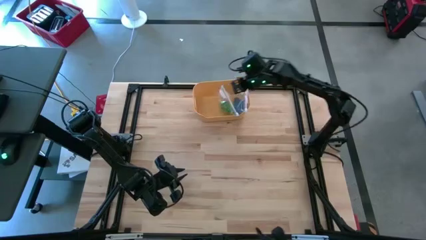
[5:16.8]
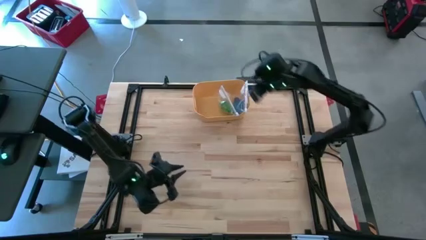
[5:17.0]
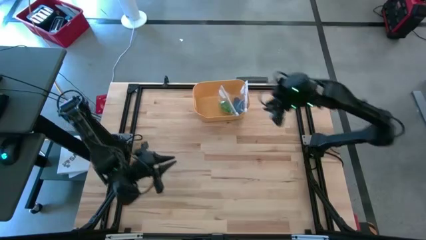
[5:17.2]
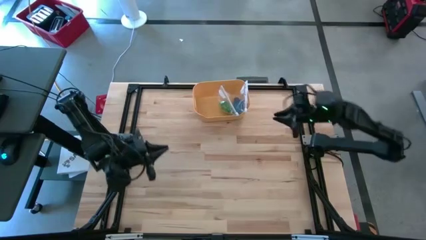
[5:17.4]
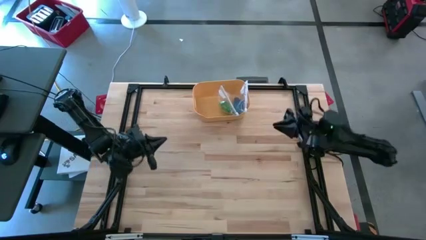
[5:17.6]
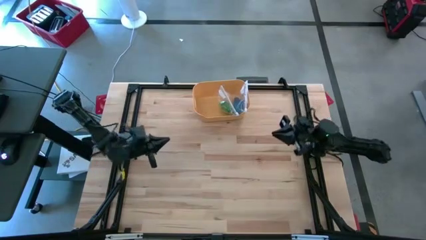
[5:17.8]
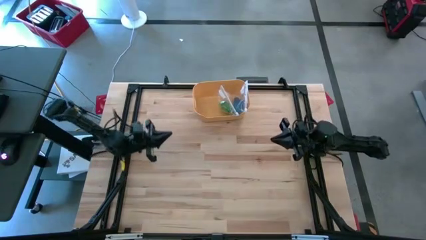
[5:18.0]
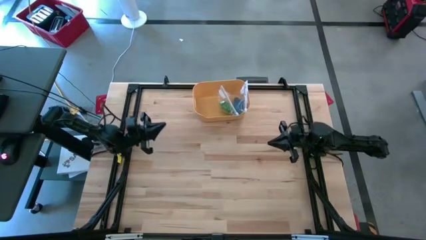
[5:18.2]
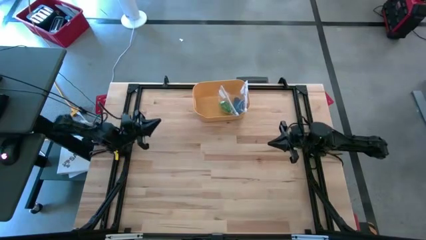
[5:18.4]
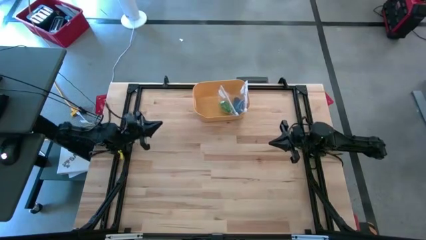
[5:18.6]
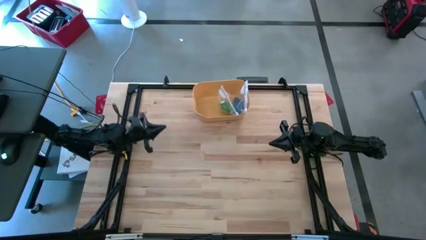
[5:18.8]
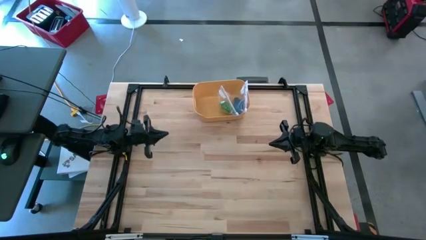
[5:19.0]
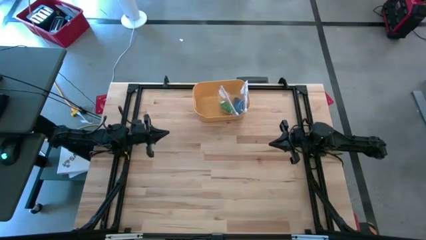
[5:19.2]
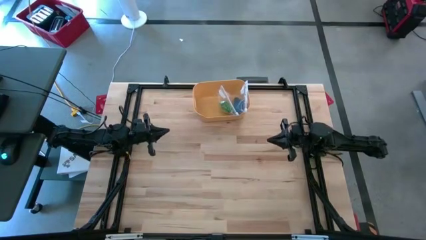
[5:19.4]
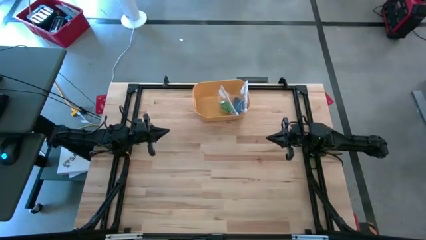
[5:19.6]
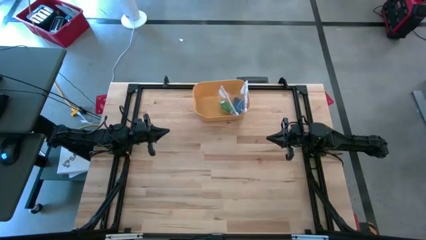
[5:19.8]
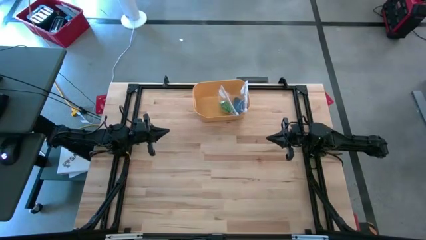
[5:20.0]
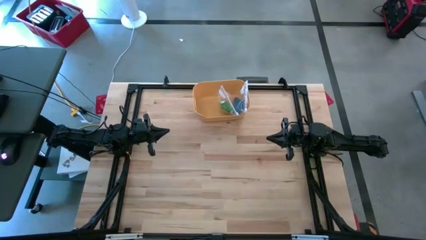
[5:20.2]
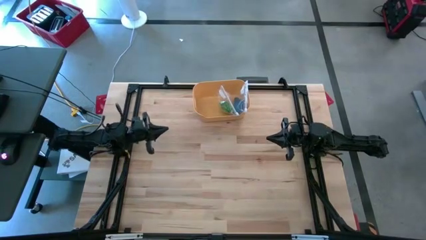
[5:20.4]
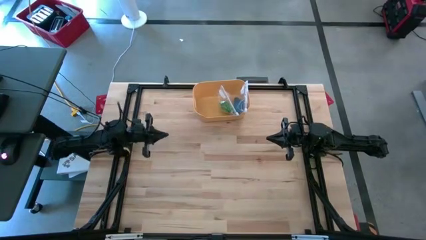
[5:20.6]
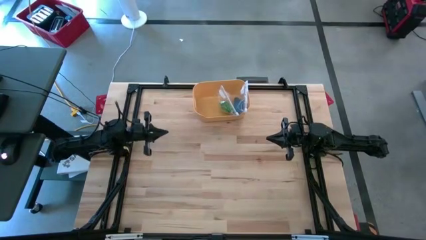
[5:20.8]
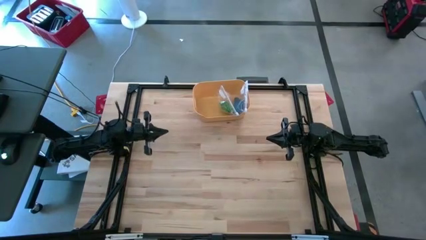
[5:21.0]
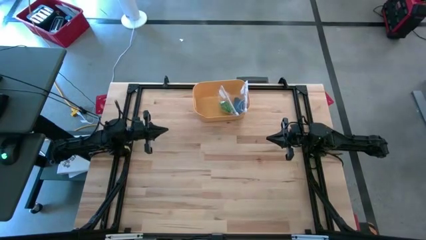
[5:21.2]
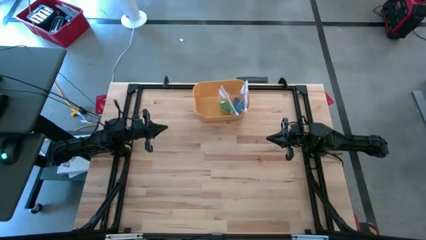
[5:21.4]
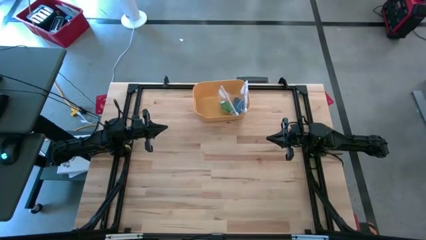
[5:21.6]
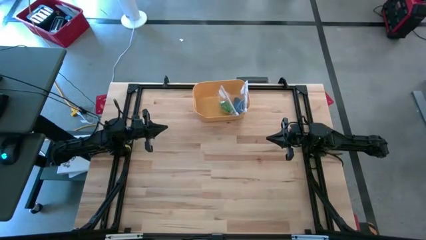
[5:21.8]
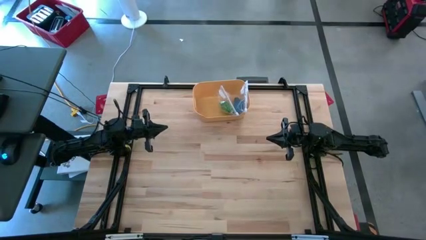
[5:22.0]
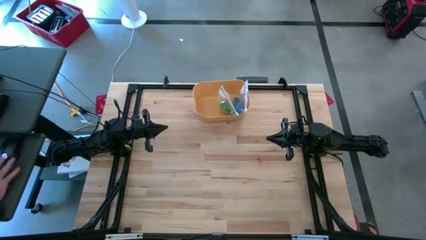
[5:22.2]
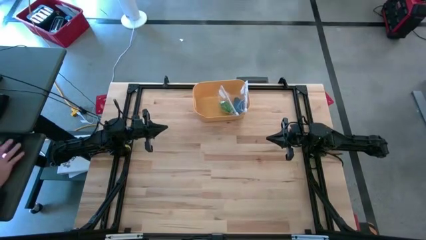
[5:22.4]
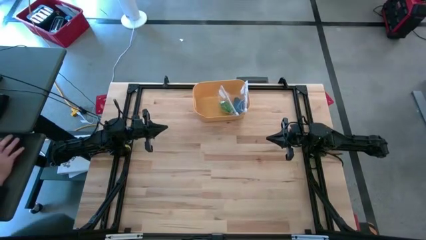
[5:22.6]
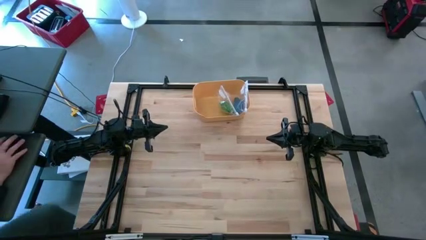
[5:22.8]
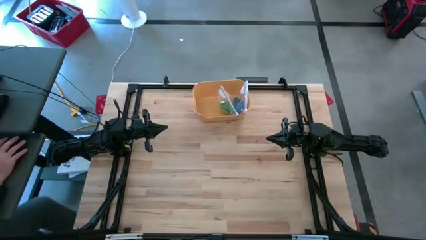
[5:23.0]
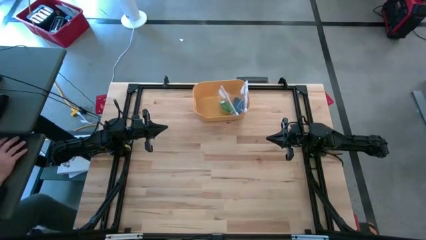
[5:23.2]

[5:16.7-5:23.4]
Task: Roll bandage
Return to Home Position

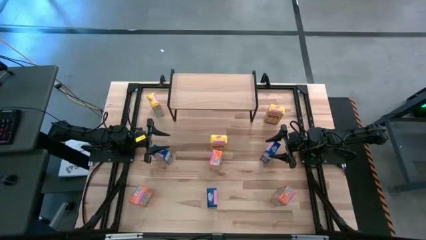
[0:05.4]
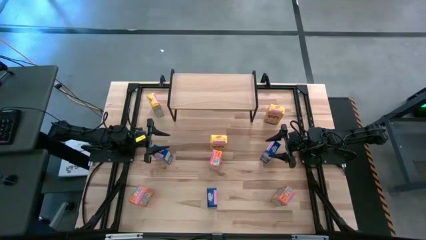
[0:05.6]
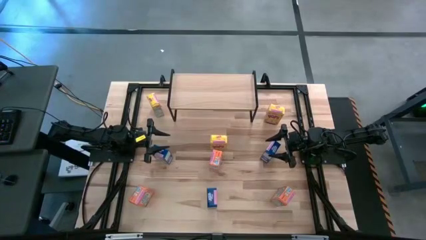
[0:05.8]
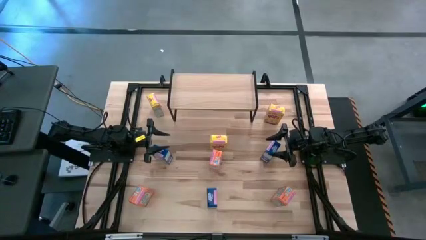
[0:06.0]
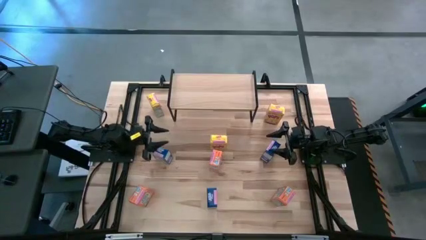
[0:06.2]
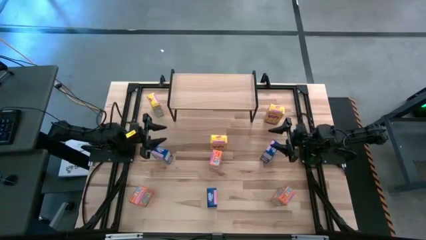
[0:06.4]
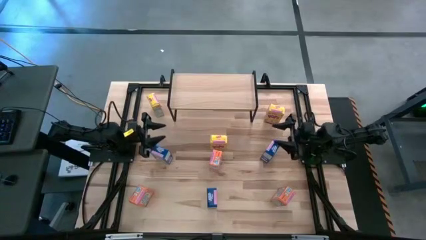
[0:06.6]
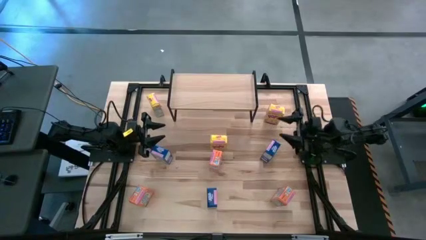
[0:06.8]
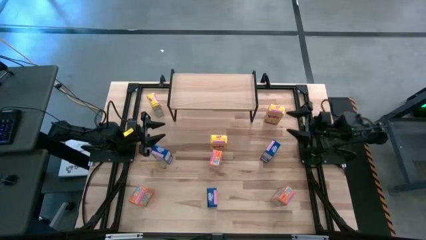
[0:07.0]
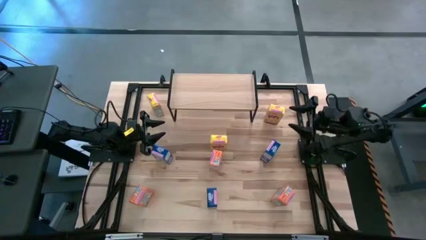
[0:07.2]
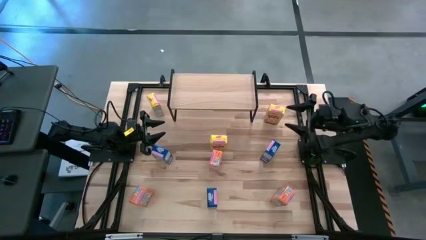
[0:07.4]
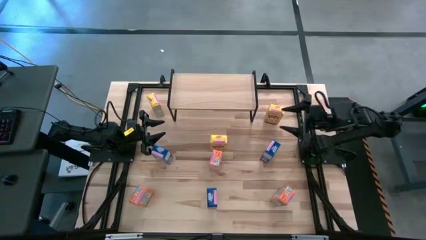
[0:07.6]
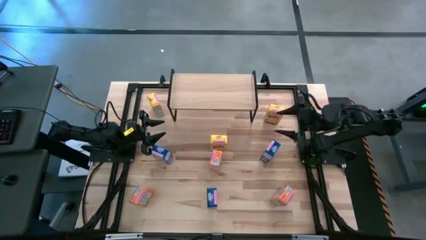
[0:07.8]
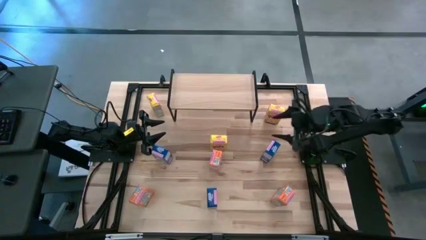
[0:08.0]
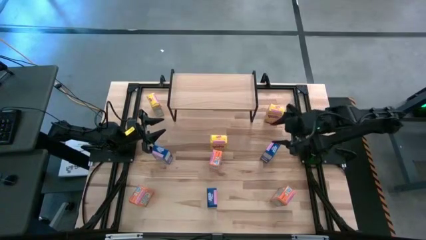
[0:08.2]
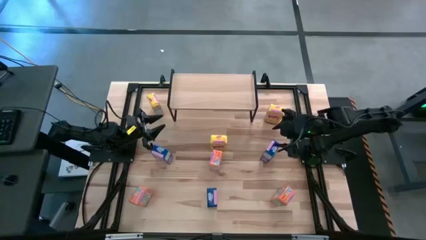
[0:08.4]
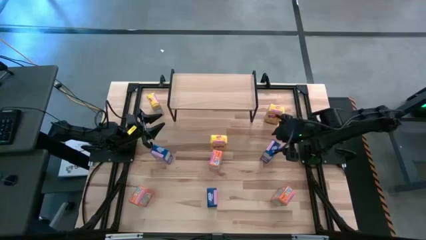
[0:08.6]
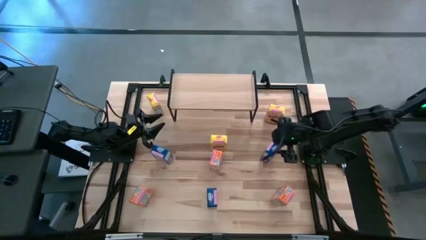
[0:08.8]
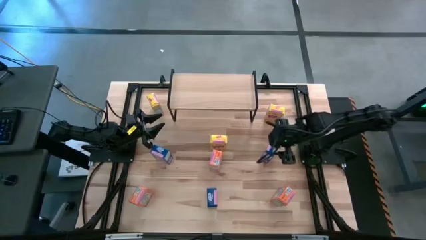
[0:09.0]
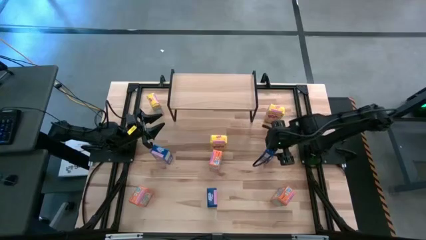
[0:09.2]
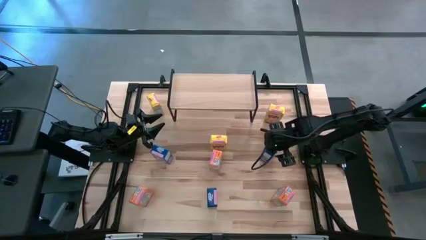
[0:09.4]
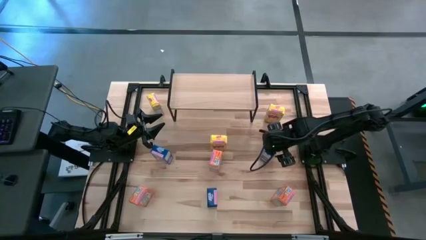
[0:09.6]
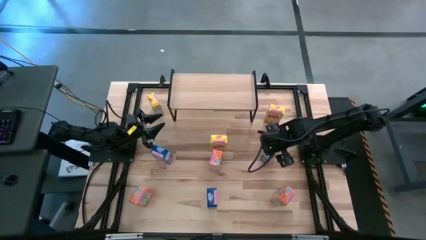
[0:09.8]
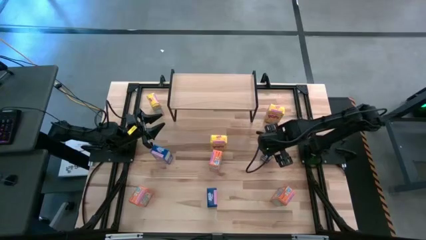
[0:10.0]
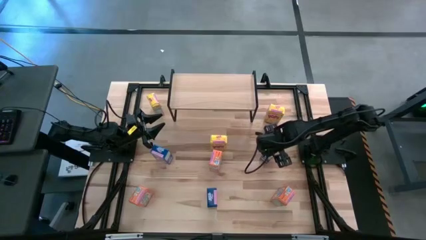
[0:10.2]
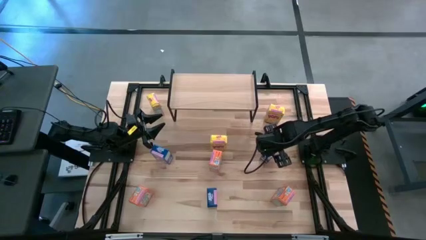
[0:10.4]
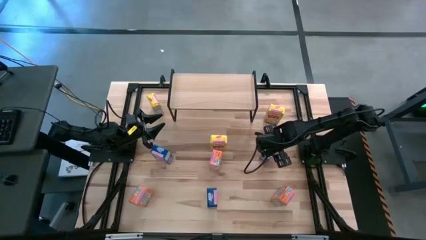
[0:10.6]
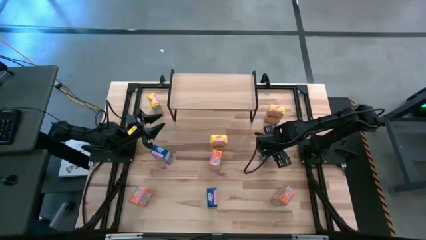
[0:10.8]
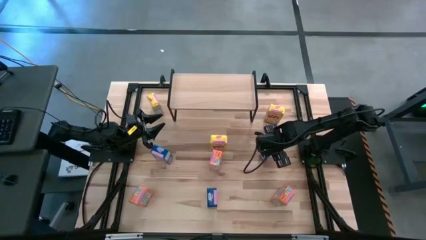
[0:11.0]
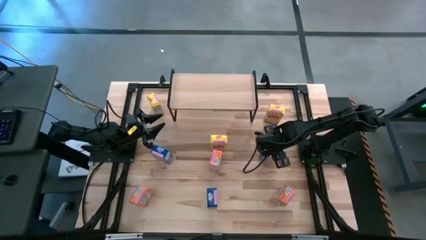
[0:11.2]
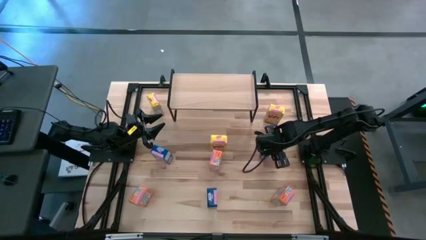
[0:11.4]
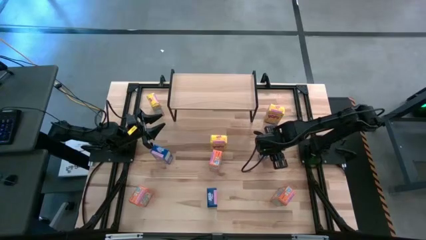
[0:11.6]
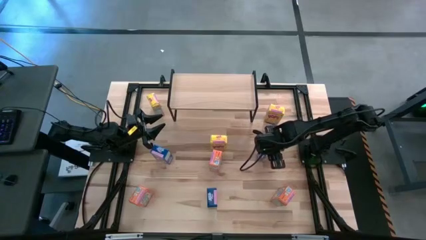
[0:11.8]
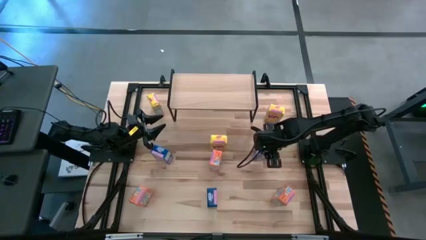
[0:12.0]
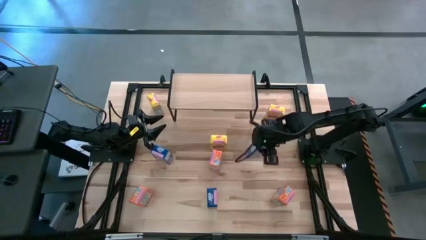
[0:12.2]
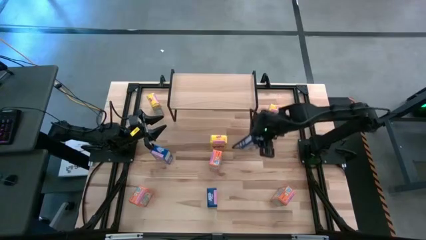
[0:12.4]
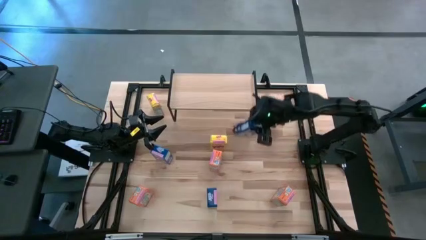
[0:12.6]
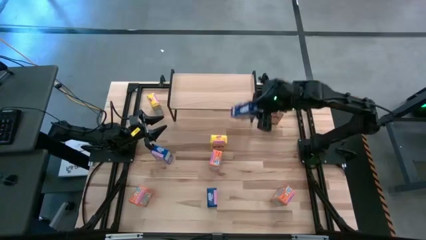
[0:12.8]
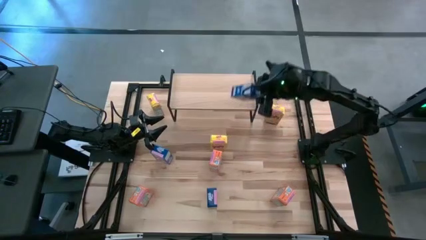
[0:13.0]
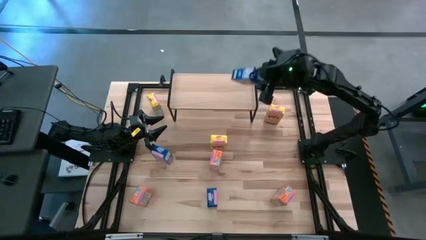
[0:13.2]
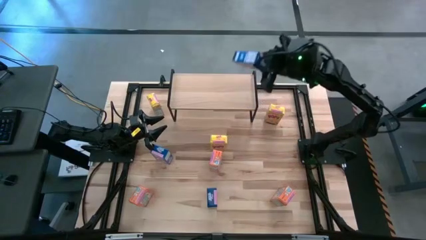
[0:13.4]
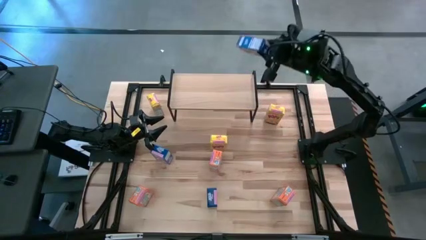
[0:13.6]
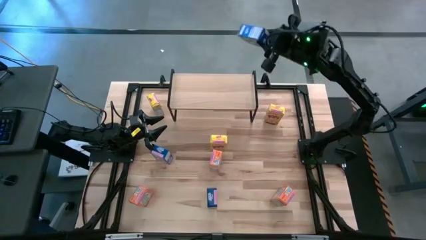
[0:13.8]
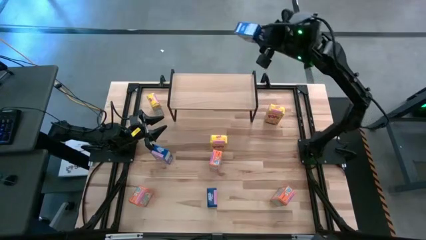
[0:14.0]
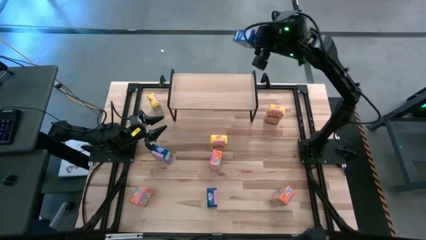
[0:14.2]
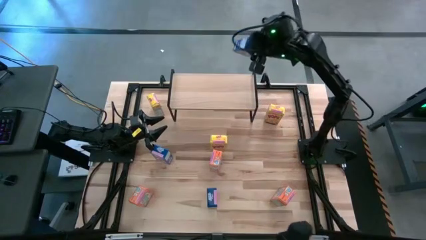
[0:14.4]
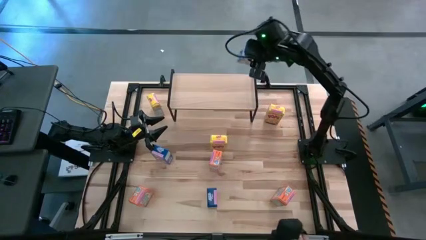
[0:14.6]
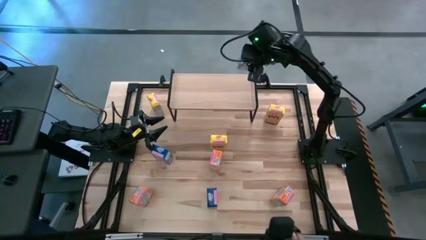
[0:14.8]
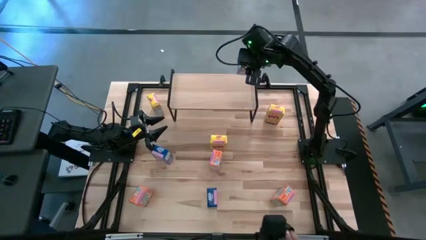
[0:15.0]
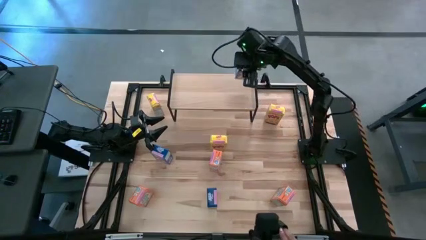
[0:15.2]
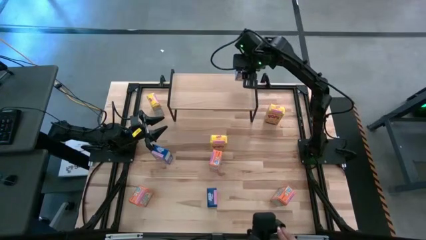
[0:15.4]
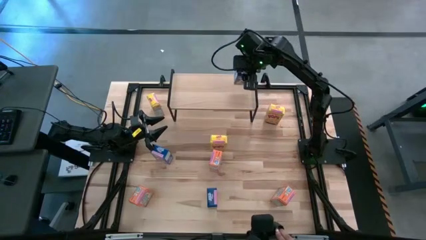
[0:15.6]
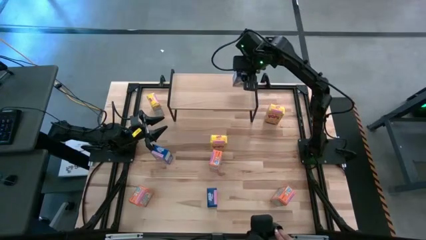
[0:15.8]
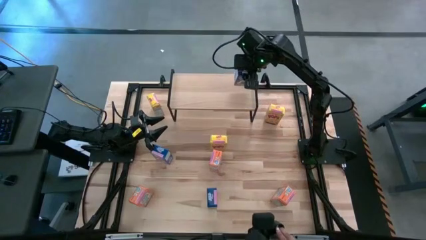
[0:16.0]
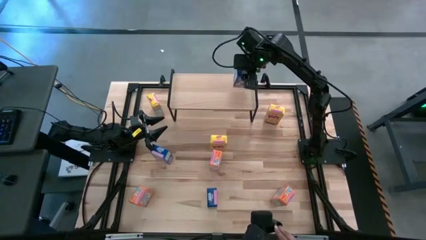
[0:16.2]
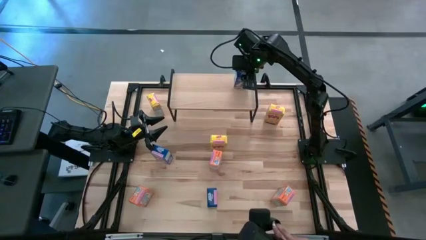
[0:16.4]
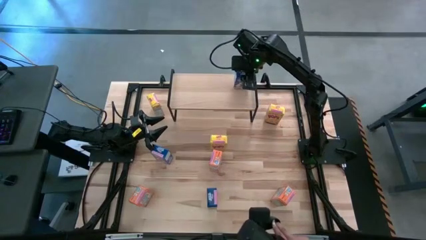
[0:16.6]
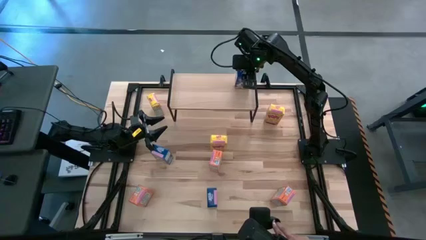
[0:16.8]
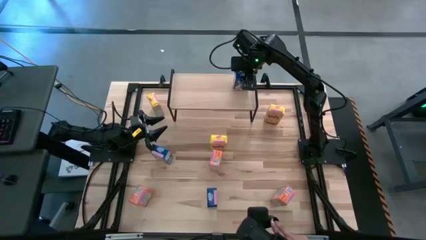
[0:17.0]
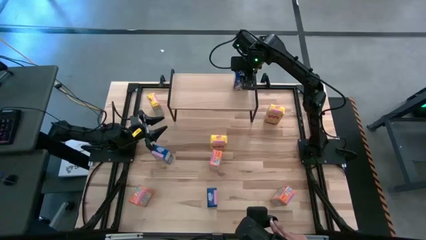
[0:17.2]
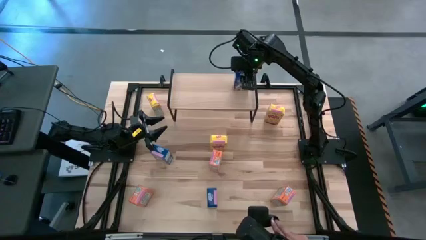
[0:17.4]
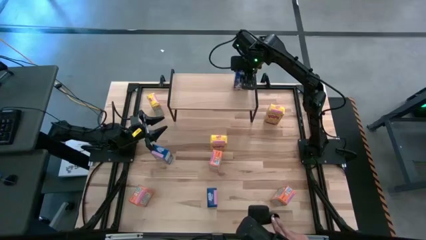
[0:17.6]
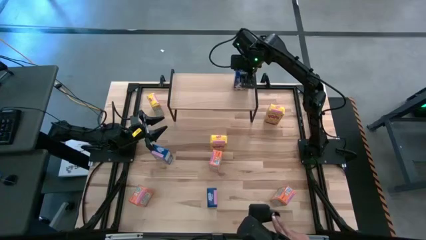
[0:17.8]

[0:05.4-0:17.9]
Task: Stack cereal on shelf
Put the top right blue cereal box on the shelf
